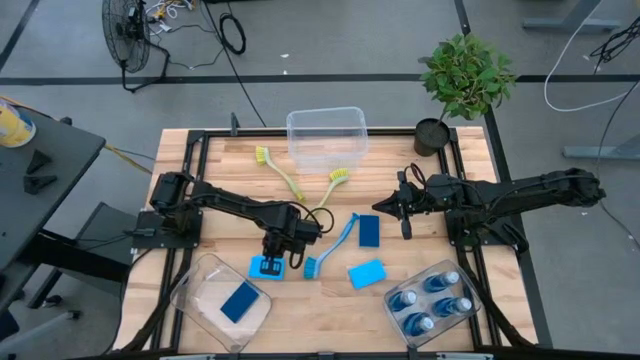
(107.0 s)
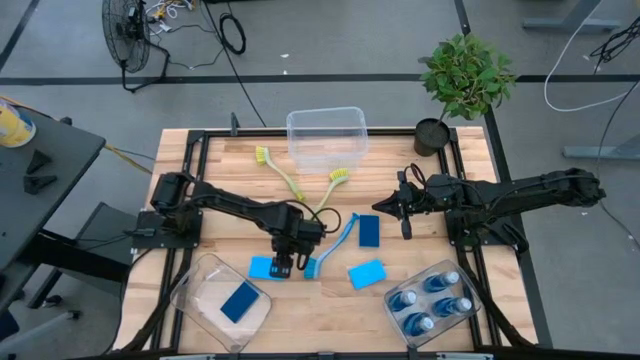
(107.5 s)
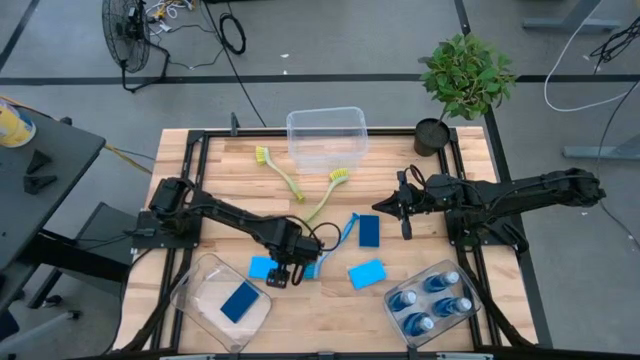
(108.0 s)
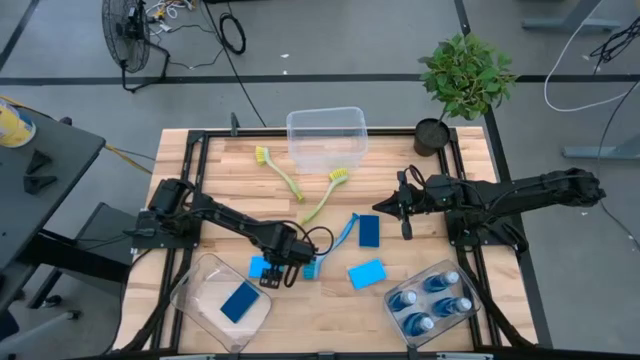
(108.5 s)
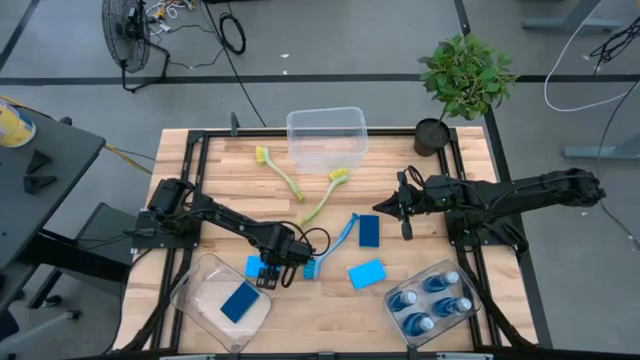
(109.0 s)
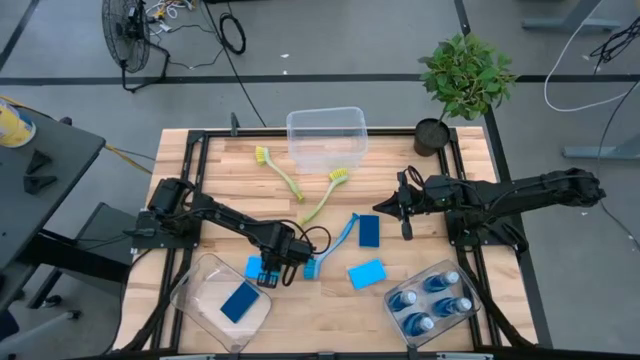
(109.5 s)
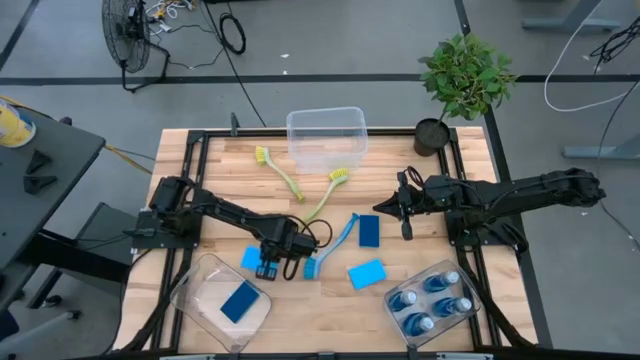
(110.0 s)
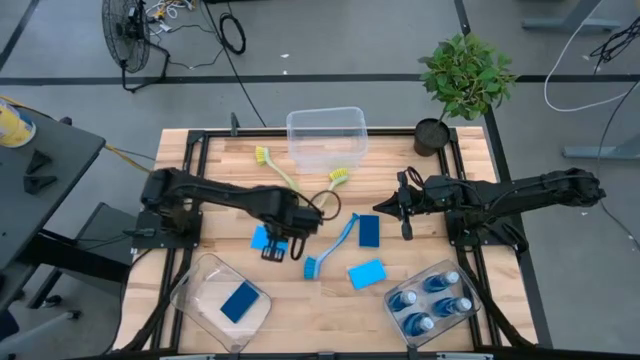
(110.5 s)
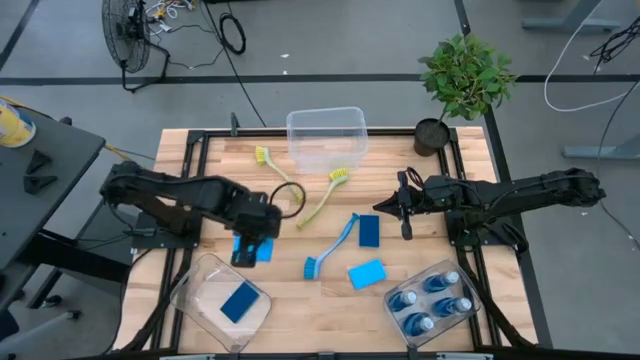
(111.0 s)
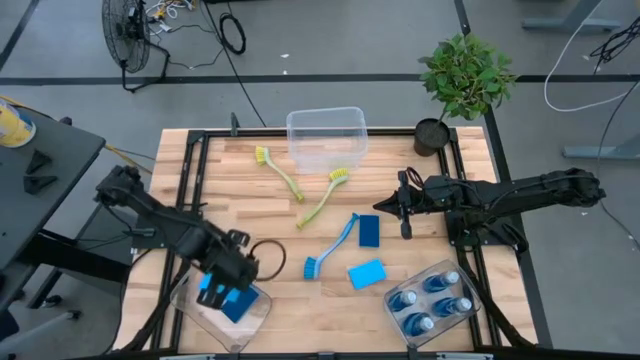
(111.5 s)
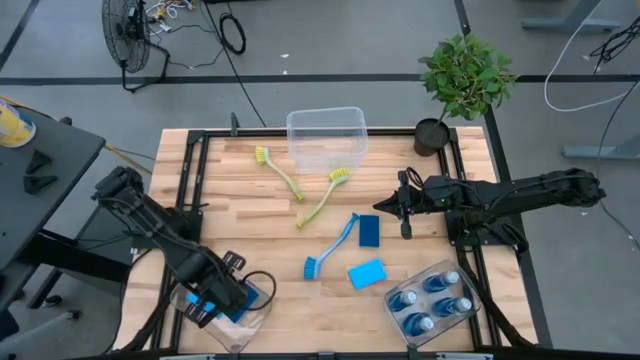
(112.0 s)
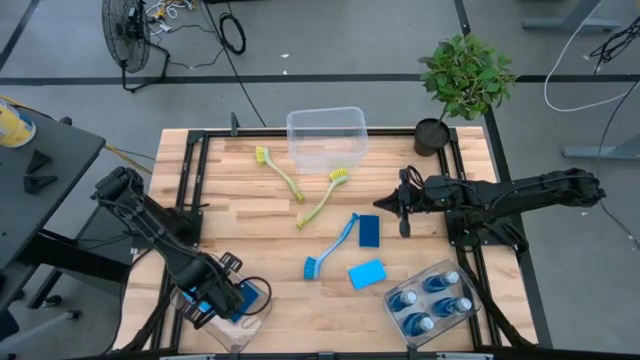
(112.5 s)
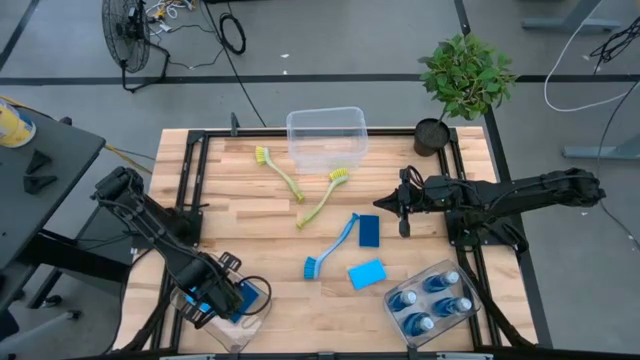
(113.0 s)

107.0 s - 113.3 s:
Task: Pick & Place Kitchen Sink Supplies
Put the blue sponge into the bottom left transparent bin

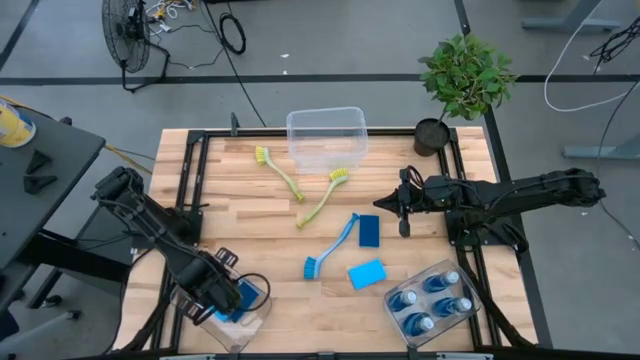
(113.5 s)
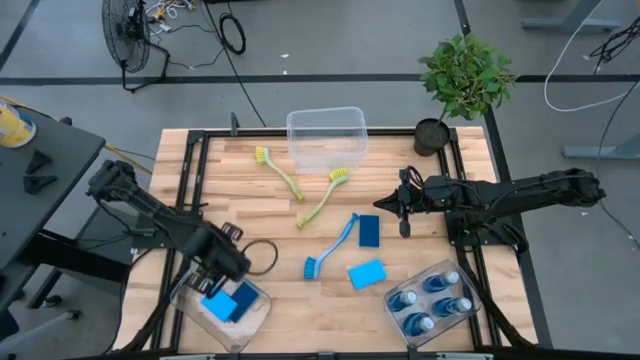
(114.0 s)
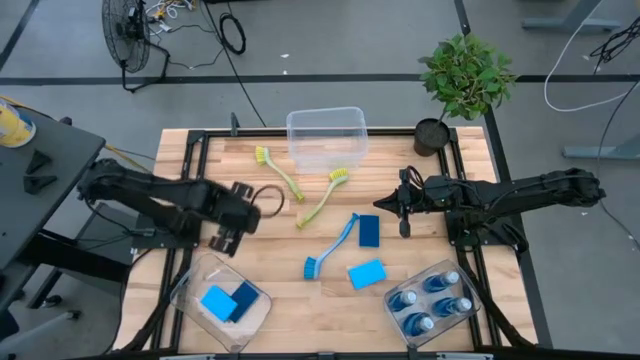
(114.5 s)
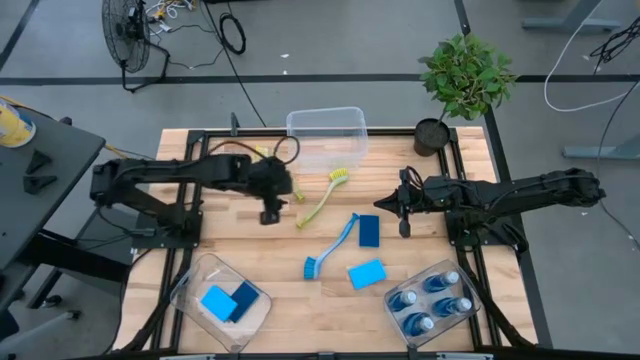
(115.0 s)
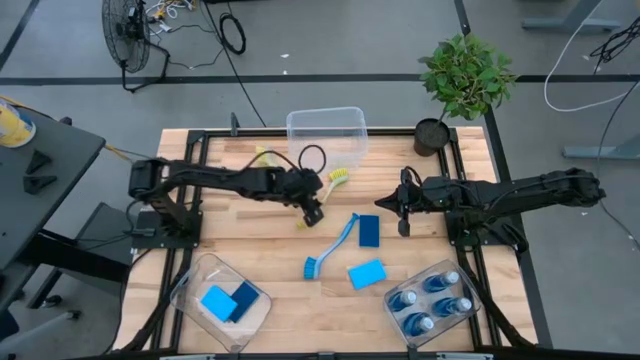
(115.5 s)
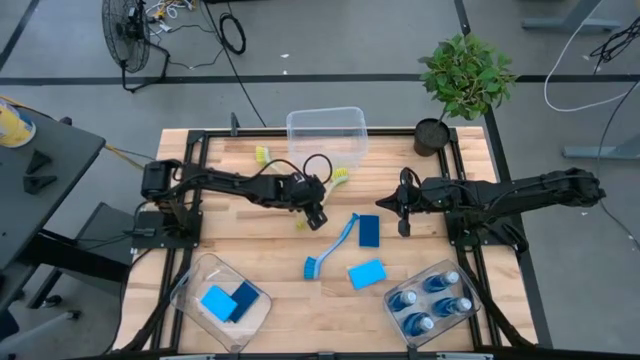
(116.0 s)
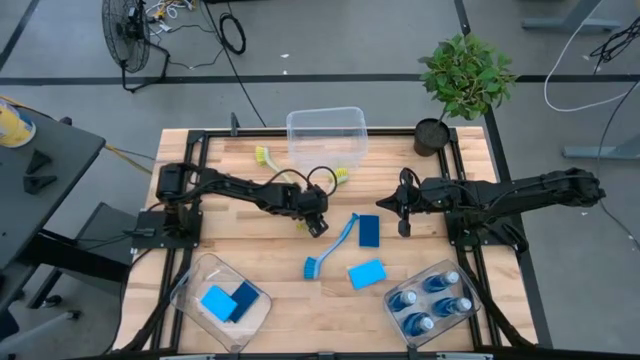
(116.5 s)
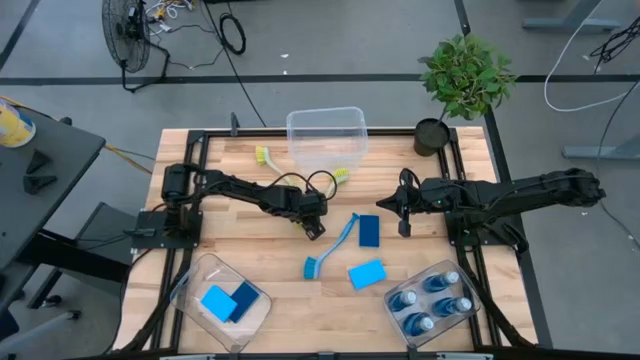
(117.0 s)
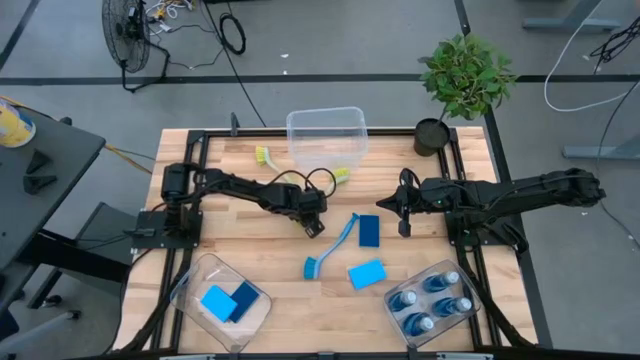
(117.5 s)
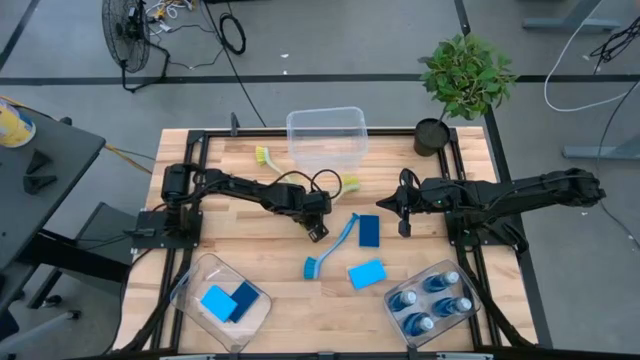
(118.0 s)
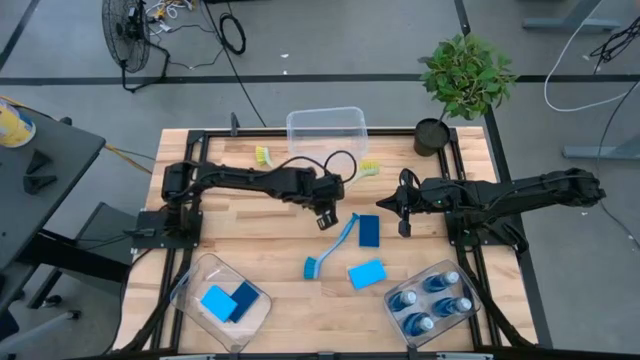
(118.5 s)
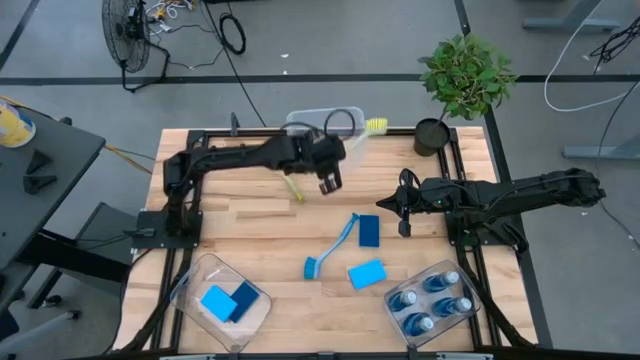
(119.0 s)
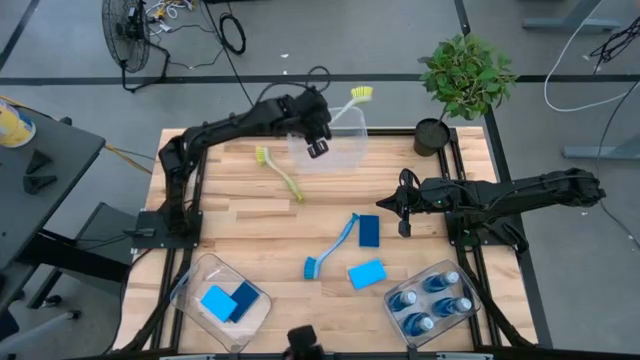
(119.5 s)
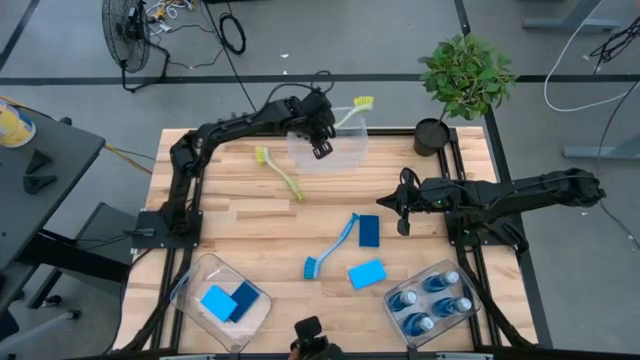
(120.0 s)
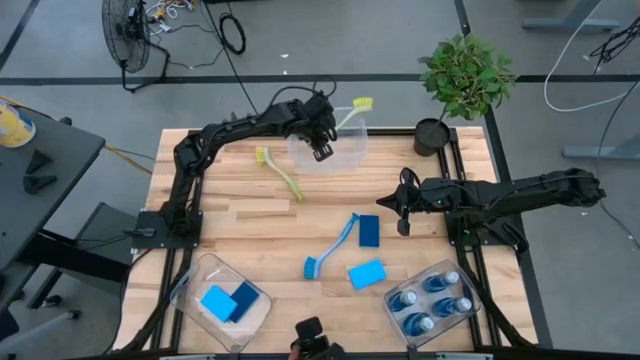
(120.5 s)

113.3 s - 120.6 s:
Put the yellow dish brush into the top center transparent bin

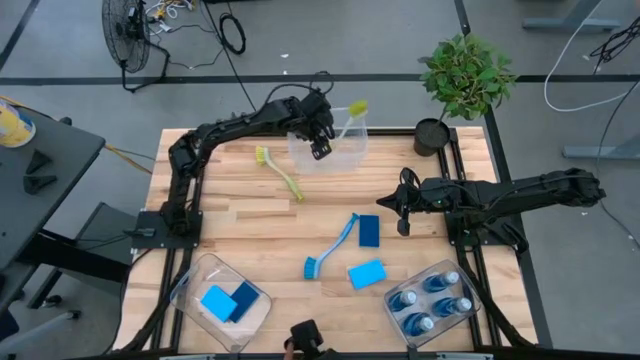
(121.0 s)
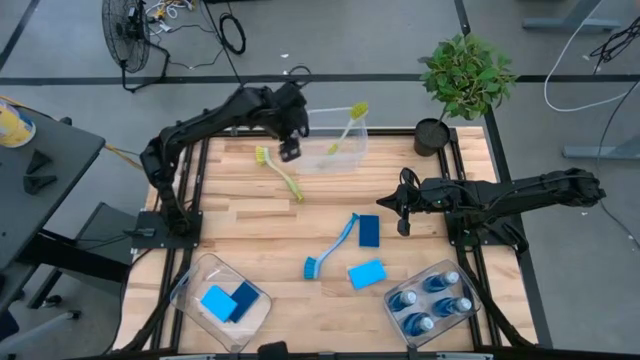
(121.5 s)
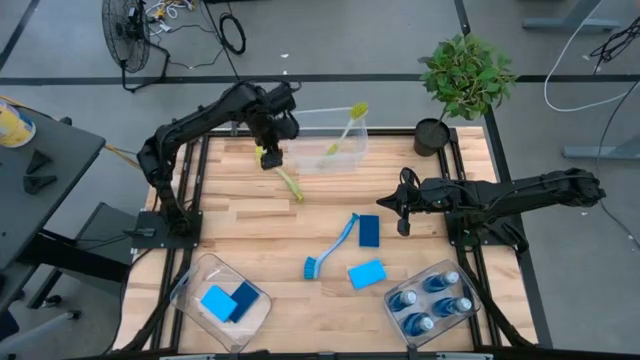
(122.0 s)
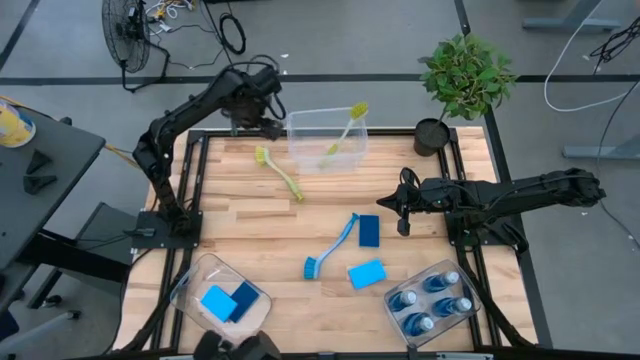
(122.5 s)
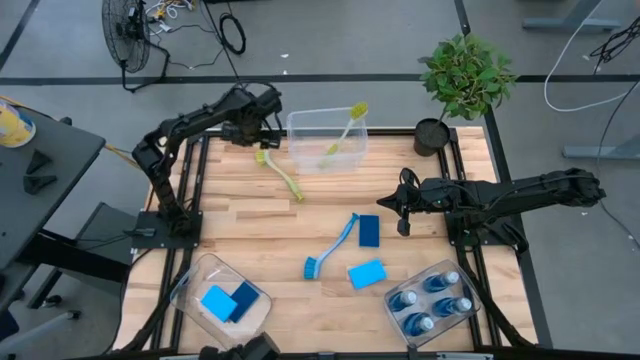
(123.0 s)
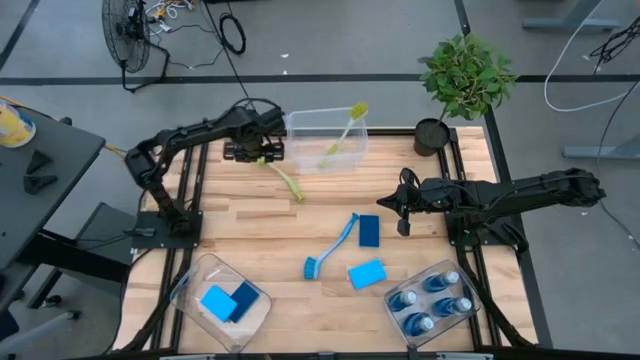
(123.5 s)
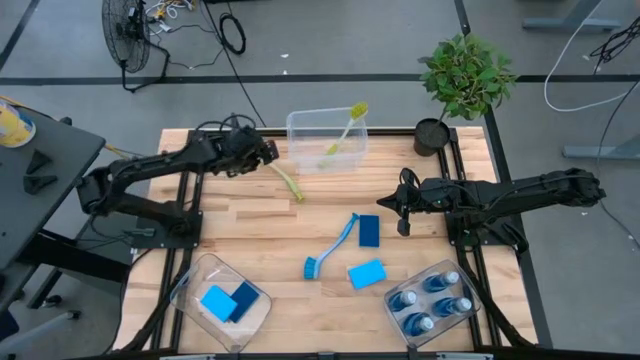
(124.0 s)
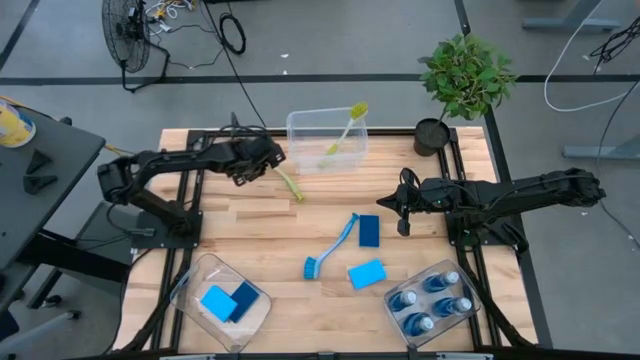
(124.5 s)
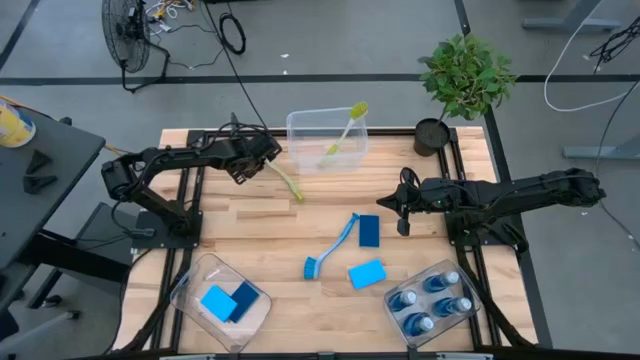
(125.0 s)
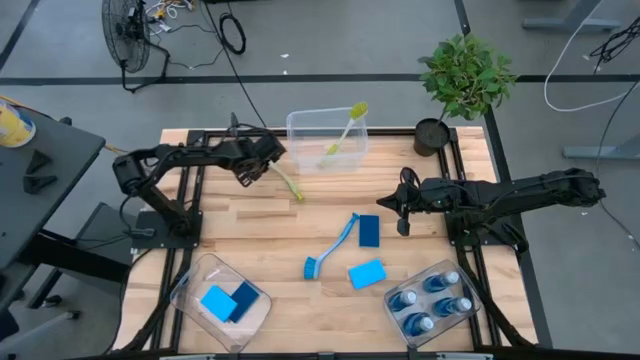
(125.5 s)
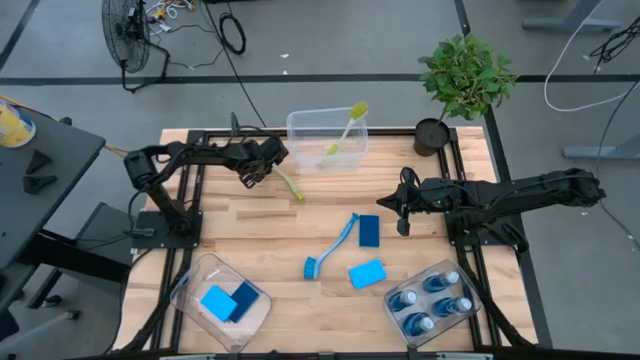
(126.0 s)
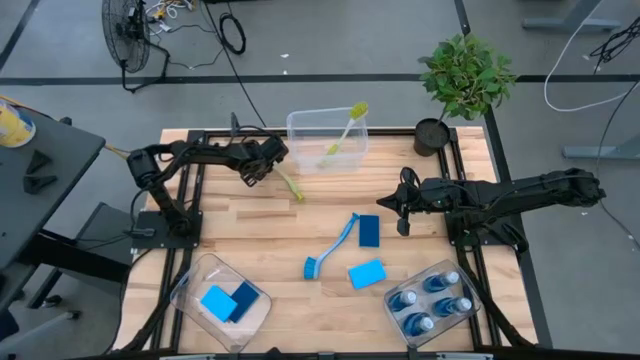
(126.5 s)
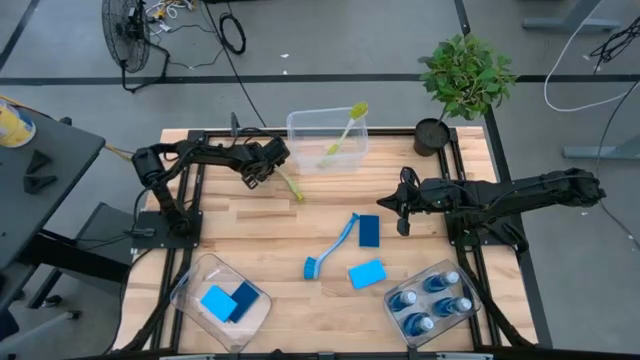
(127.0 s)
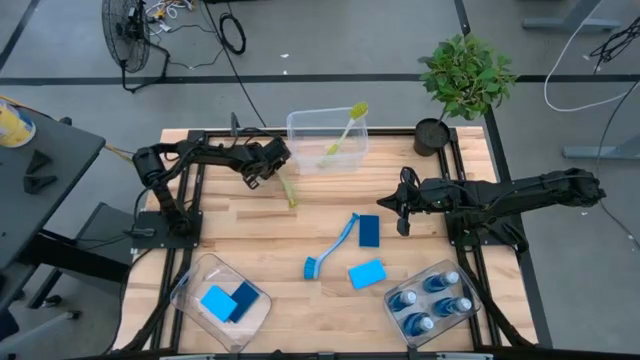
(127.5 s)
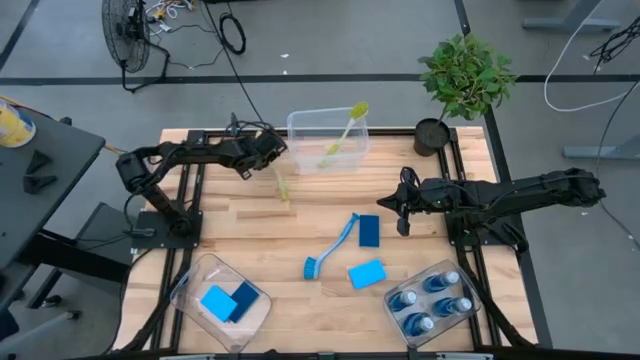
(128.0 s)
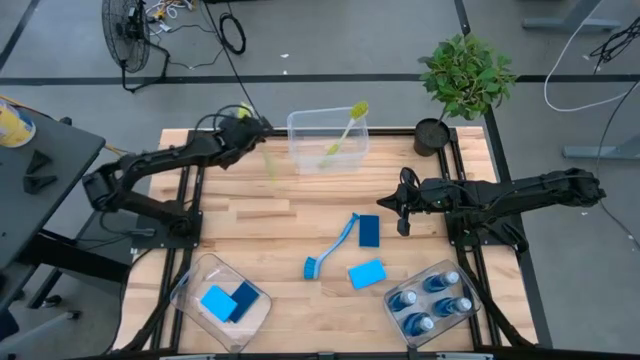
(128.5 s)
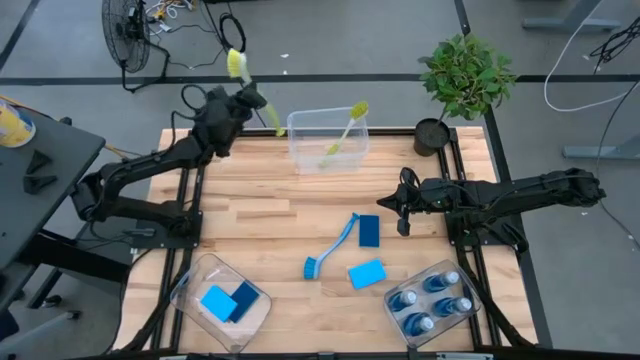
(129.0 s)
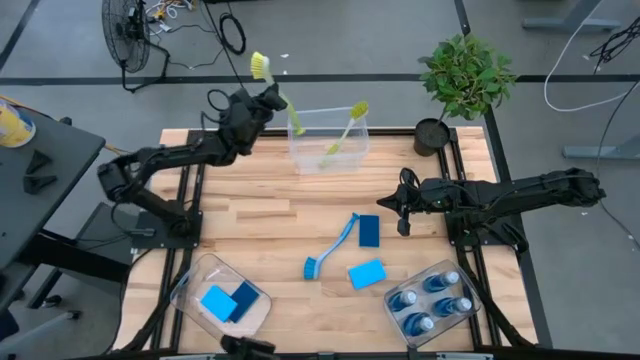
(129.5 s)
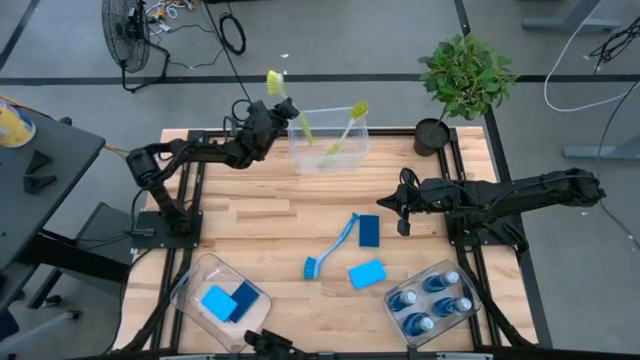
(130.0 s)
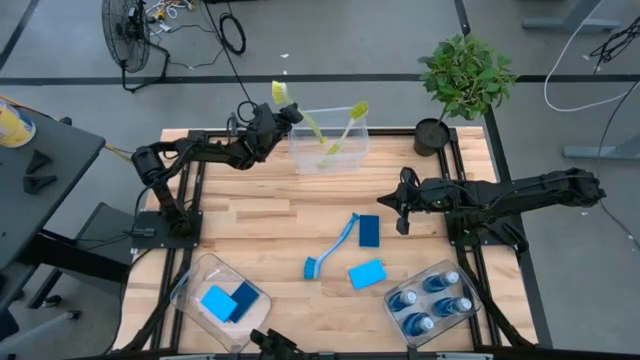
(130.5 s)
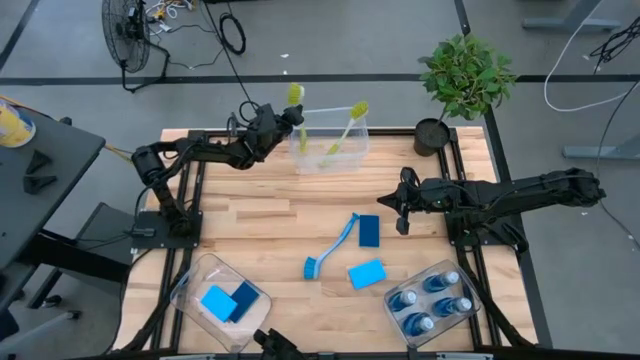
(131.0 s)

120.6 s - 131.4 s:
Put the yellow dish brush into the top center transparent bin
